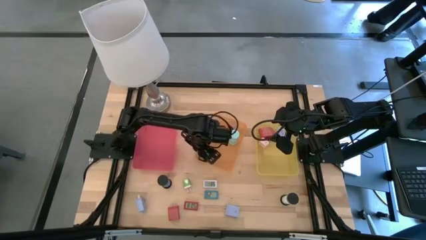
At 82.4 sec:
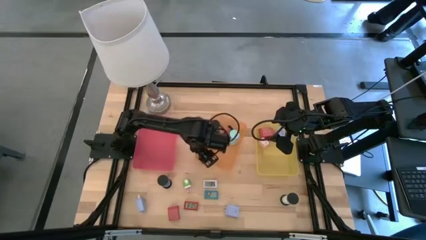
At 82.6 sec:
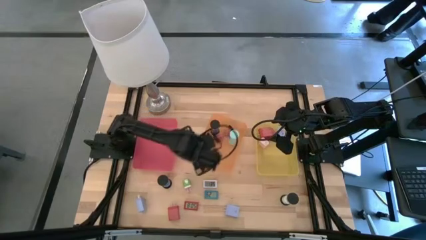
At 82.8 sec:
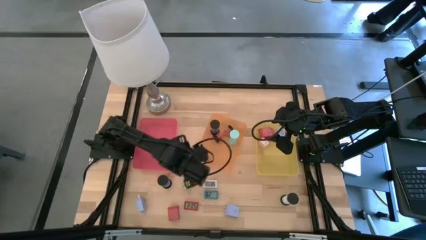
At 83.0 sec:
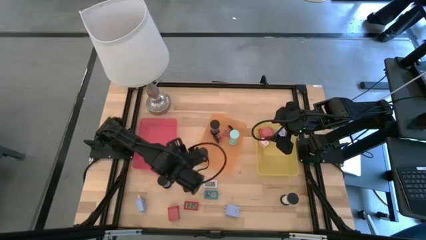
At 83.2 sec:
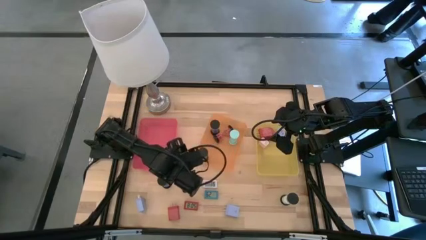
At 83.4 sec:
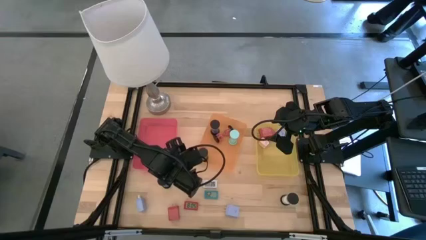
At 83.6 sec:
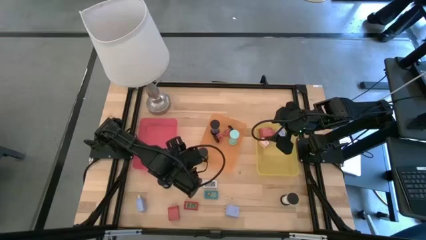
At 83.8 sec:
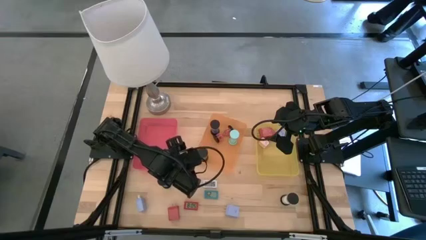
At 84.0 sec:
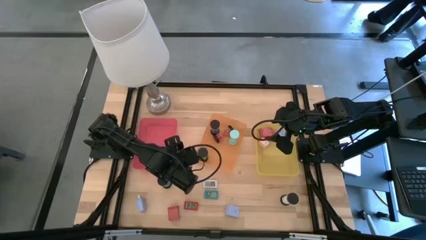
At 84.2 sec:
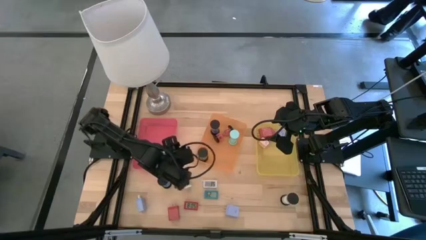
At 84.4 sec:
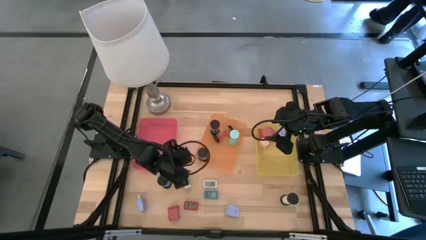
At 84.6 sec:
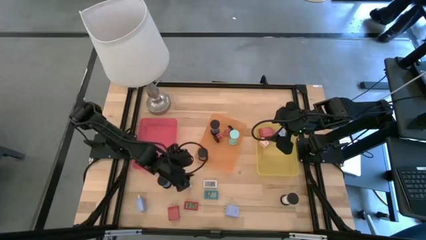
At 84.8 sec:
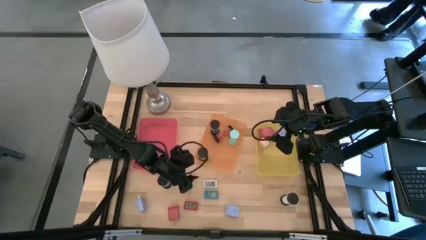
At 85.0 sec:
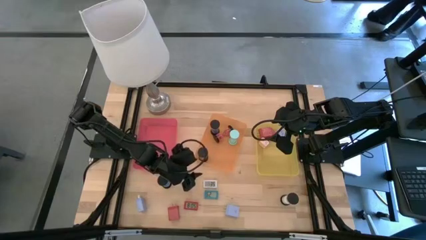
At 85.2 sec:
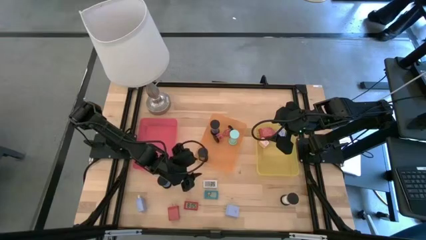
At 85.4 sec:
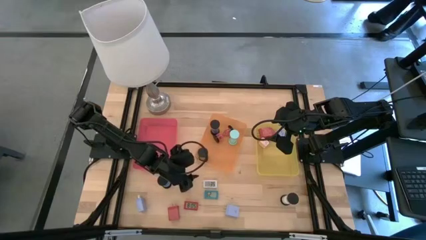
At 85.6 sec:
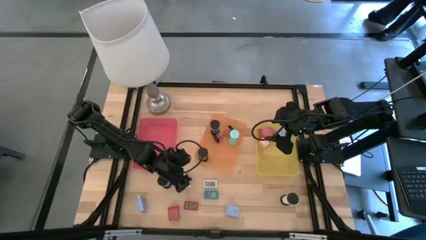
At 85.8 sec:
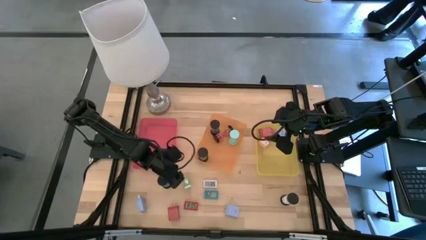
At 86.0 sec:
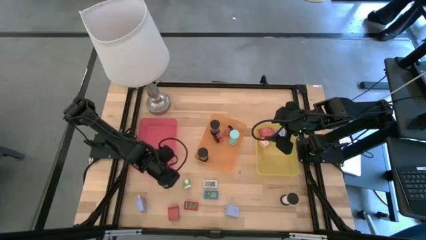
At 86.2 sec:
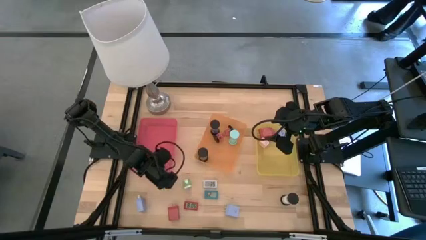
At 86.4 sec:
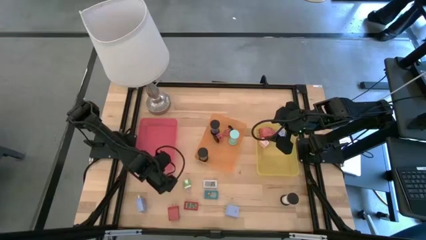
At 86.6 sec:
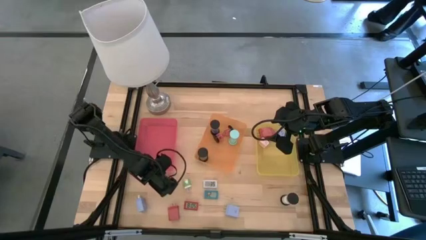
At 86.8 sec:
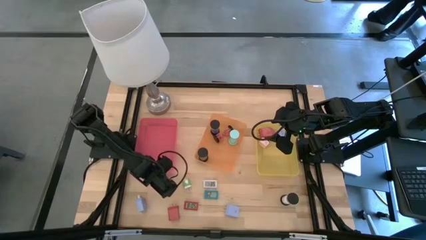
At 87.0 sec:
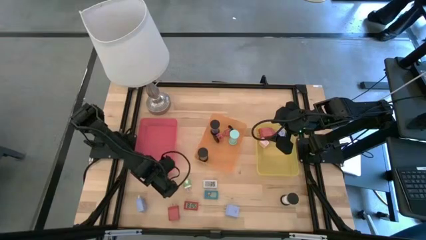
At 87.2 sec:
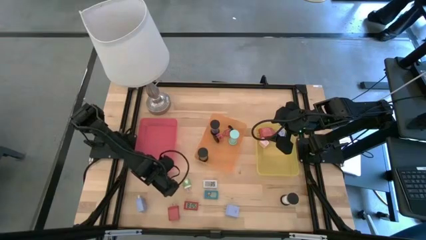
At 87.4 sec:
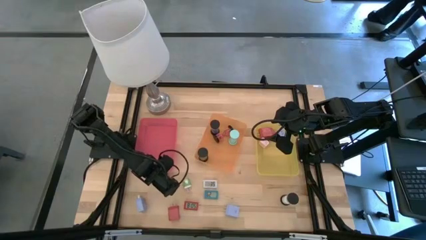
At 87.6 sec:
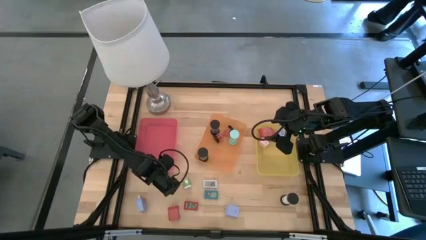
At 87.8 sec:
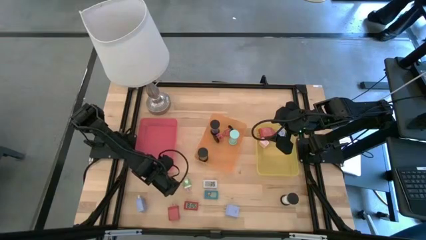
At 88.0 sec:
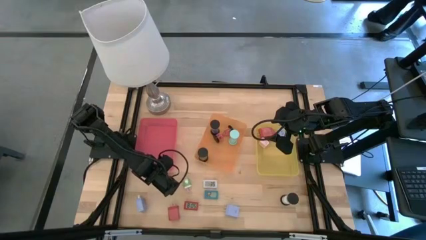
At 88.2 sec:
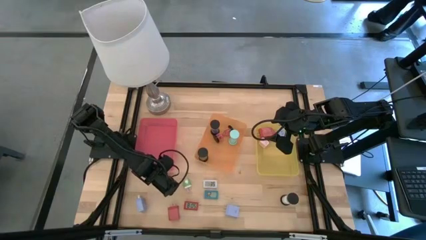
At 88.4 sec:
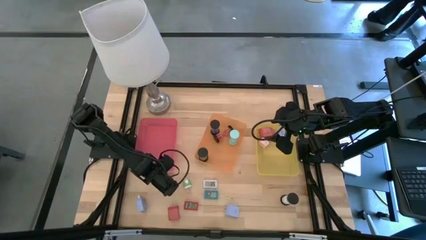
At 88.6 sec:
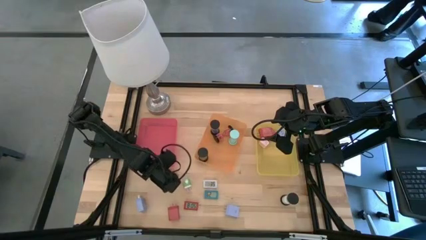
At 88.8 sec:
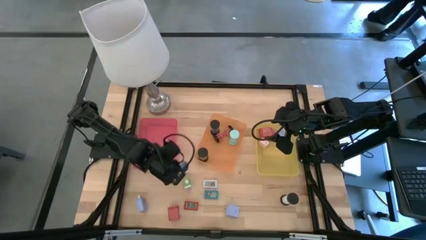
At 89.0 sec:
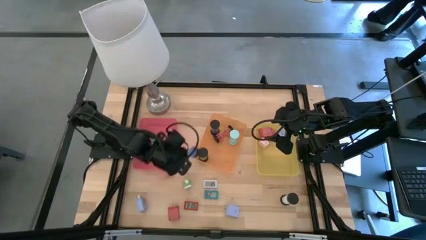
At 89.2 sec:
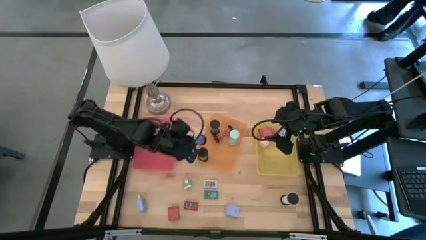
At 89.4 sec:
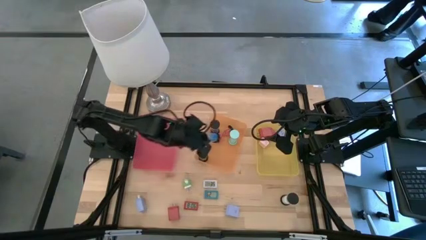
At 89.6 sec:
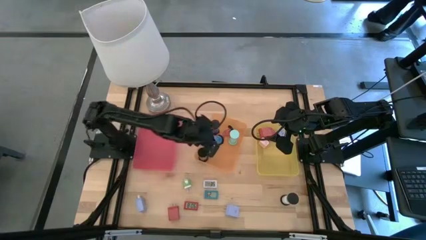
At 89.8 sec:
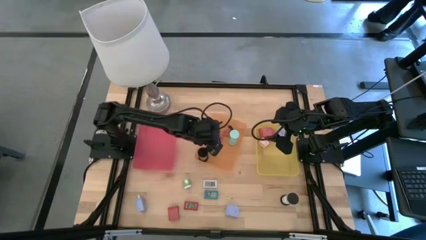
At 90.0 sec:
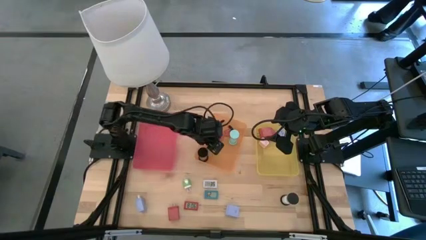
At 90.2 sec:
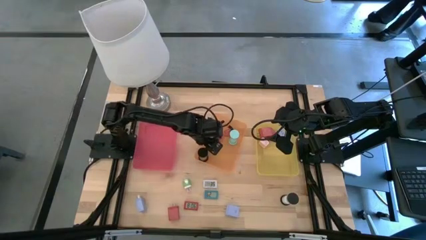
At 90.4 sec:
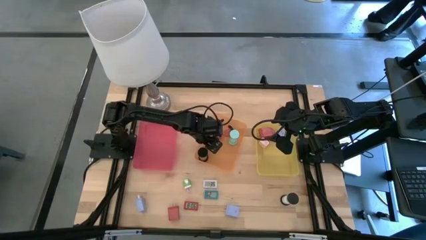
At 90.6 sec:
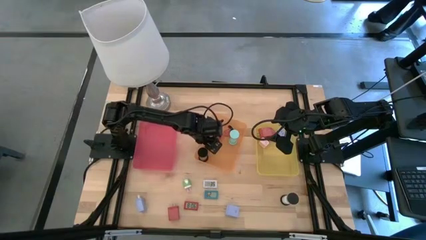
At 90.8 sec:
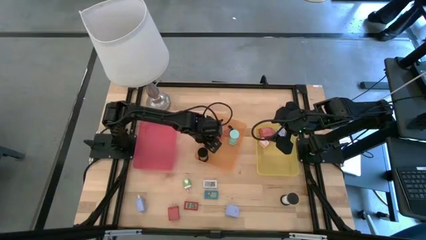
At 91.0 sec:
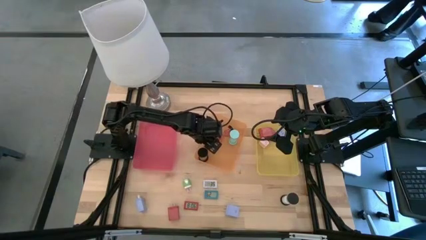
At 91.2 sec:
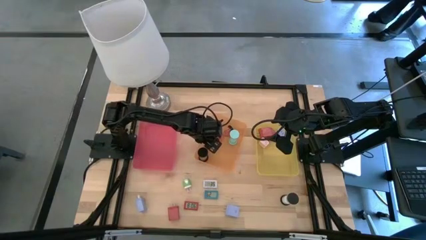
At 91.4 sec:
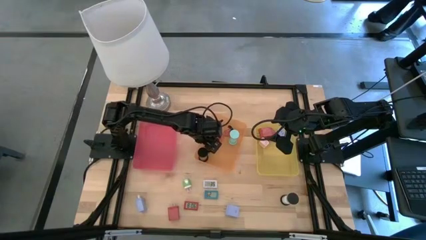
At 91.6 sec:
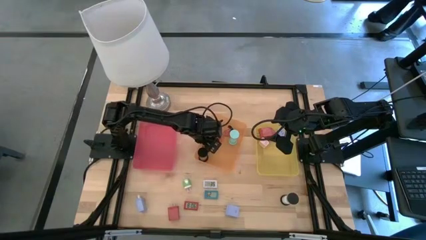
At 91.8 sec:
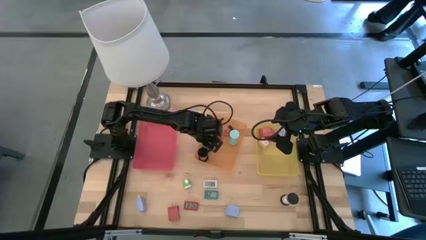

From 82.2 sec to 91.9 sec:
Task: Pick & Place Office items
Put the blue hourglass into the orange bin

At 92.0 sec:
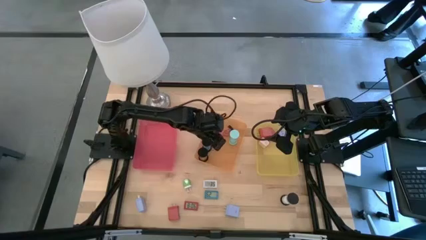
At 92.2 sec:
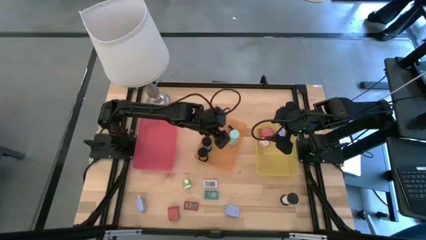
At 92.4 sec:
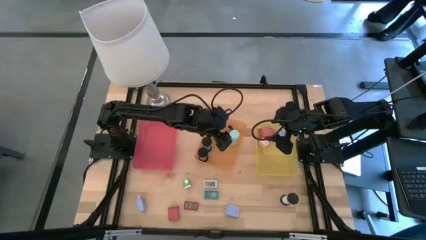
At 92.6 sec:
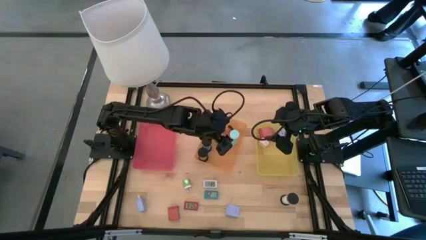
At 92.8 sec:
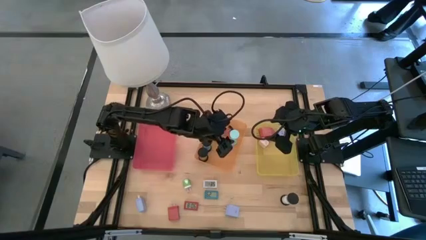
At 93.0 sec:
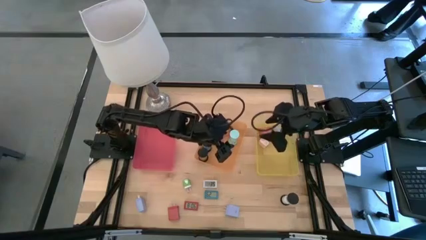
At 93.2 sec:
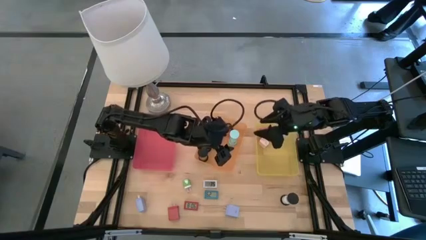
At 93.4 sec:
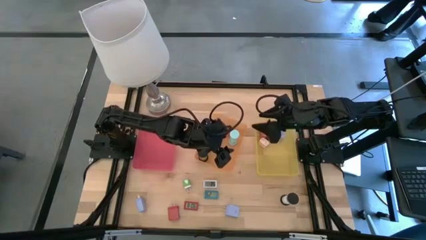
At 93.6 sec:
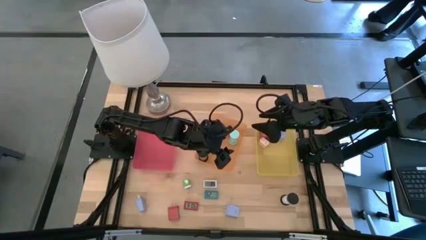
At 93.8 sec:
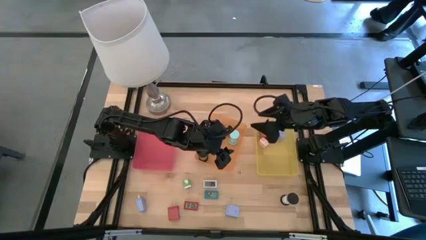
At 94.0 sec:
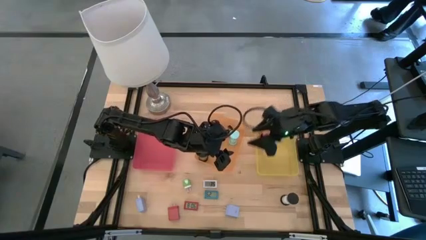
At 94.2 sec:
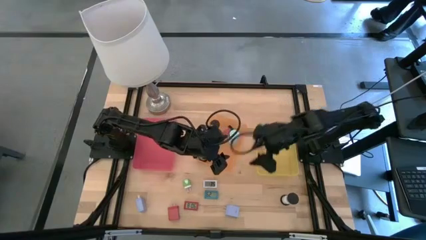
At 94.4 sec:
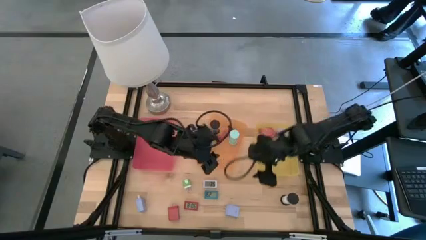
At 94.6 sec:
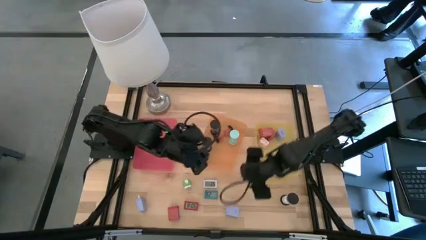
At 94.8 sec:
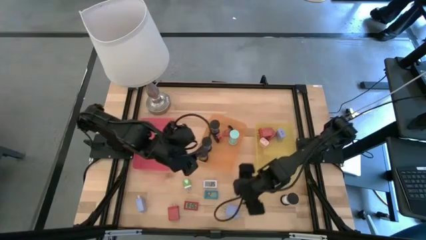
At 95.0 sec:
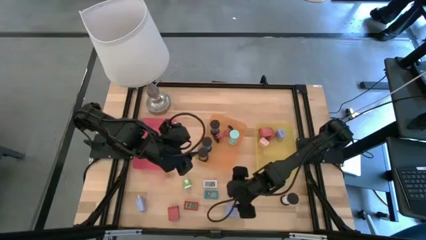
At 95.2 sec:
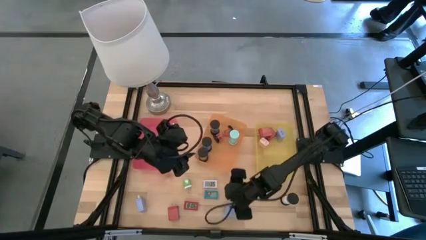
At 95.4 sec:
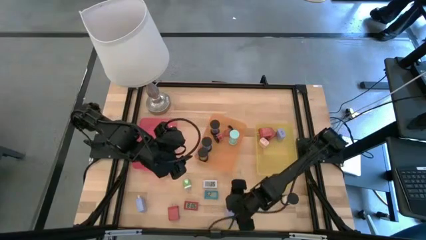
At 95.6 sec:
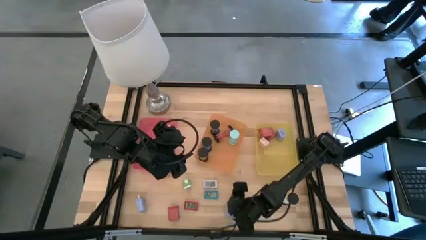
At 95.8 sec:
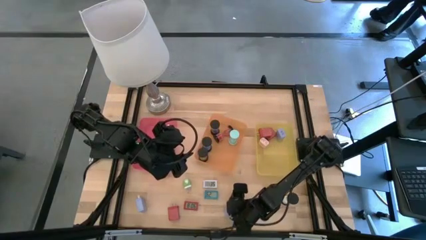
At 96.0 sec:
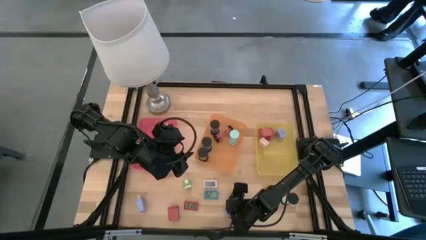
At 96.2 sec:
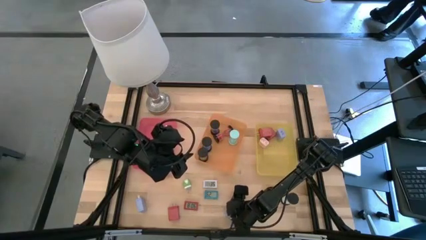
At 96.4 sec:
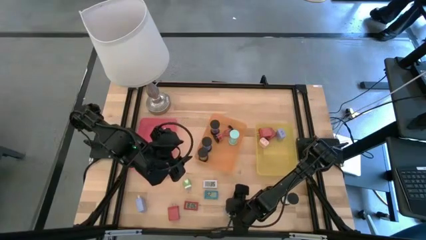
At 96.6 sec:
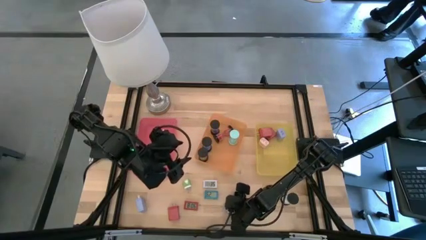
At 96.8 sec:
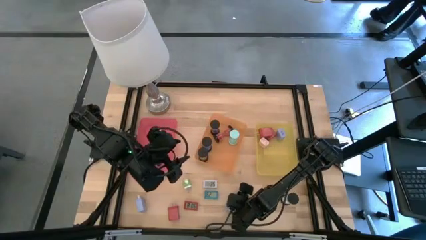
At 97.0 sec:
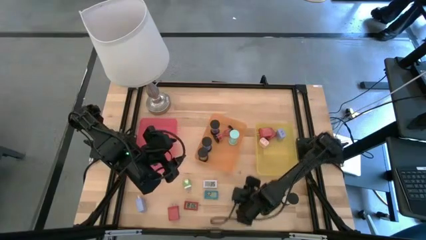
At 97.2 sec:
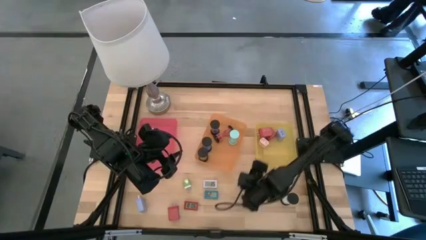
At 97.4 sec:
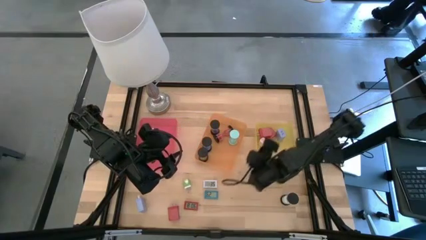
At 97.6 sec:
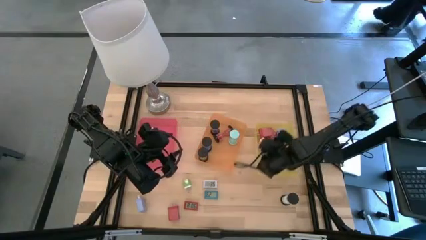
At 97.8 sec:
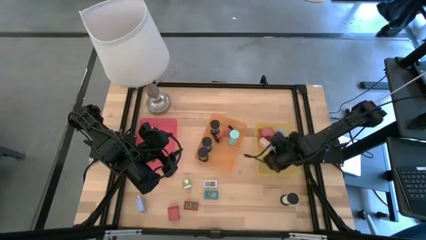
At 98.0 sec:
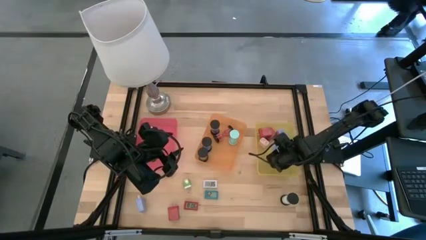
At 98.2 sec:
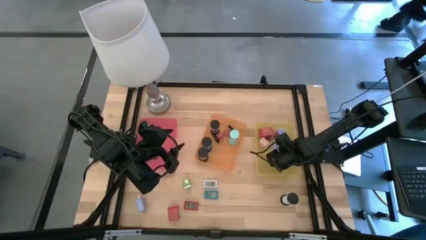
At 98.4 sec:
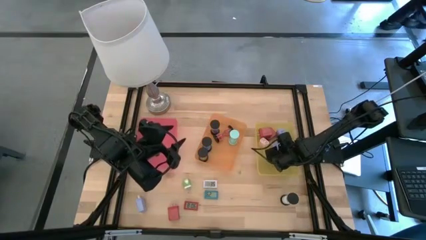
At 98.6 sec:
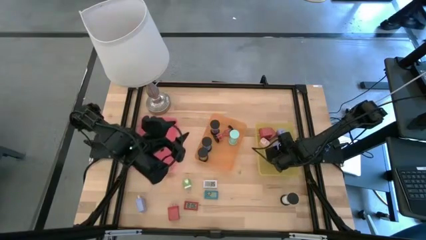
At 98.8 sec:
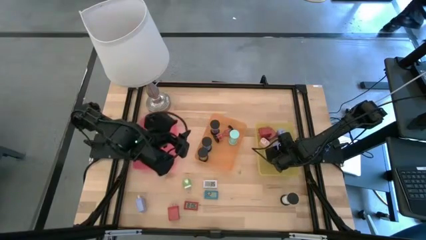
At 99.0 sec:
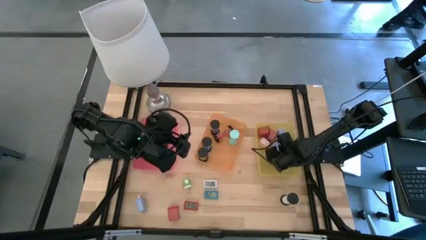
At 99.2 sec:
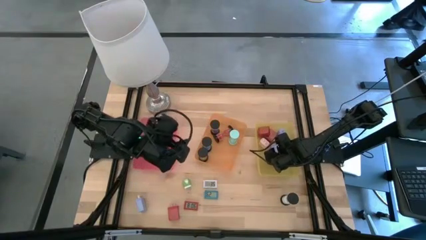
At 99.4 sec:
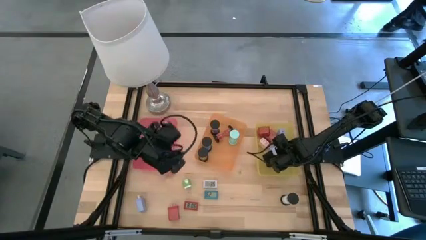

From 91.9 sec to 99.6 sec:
Put the right light blue charger adapter into the yellow bin
